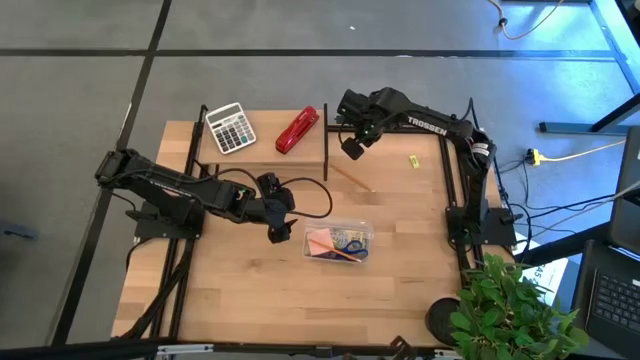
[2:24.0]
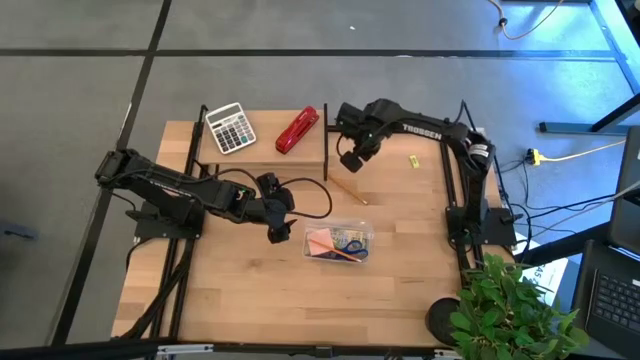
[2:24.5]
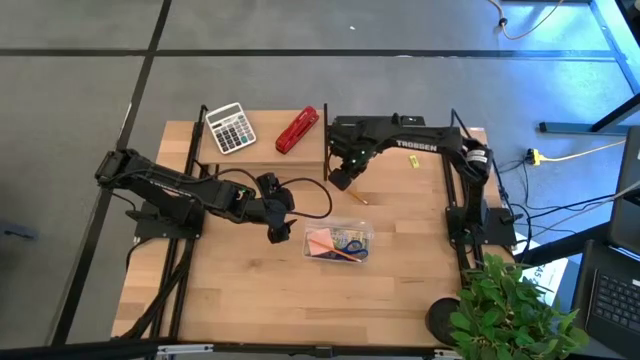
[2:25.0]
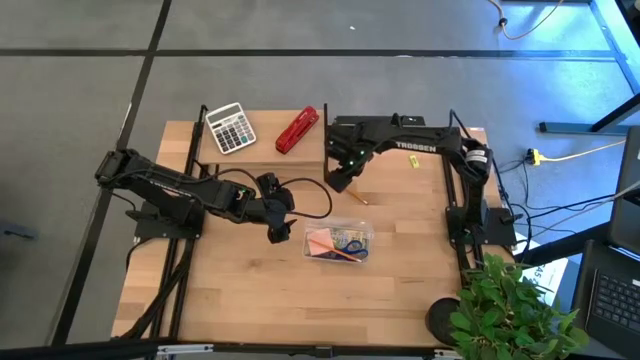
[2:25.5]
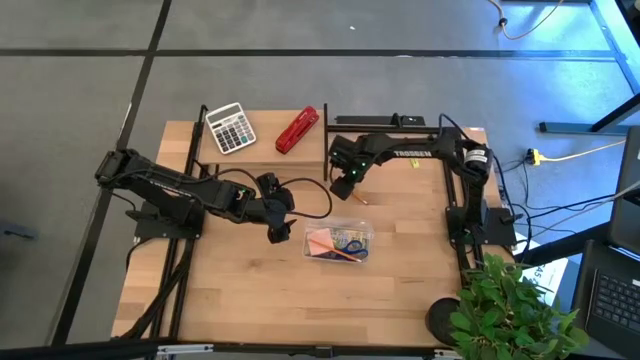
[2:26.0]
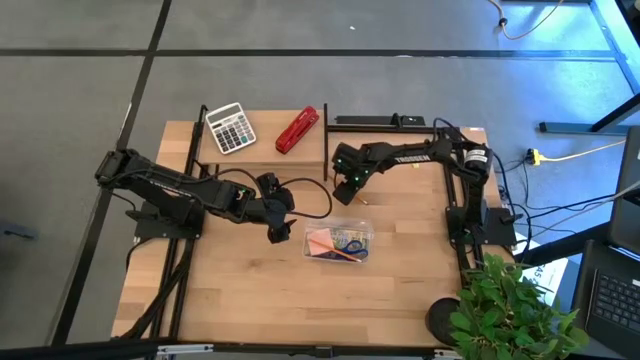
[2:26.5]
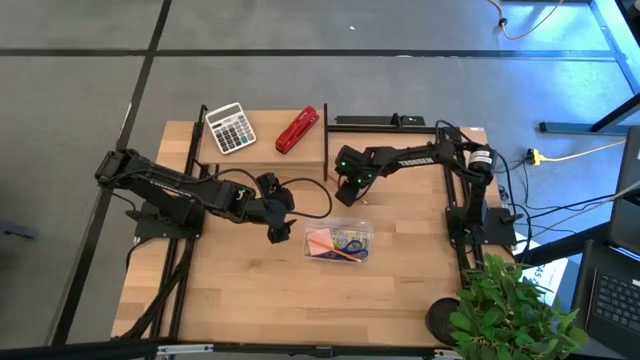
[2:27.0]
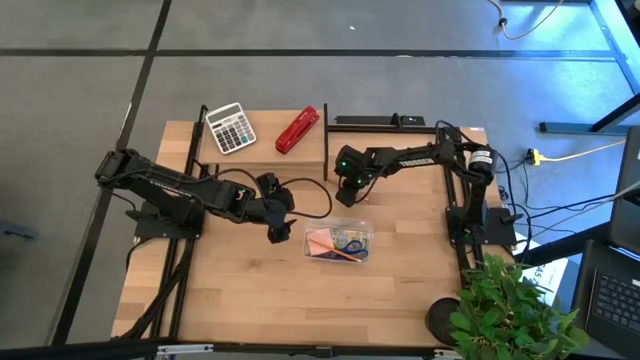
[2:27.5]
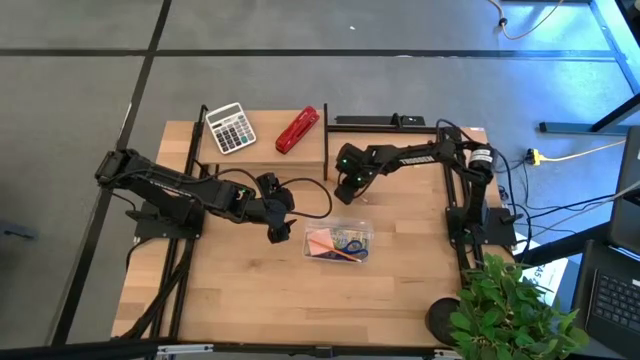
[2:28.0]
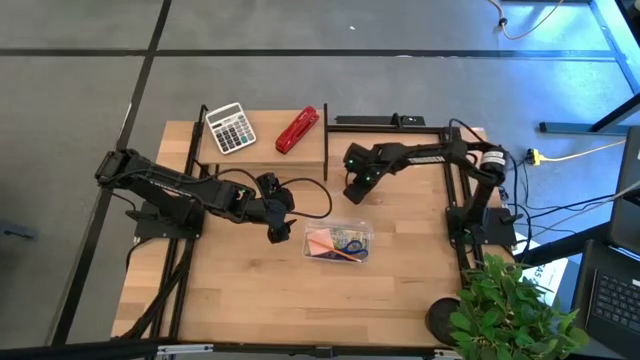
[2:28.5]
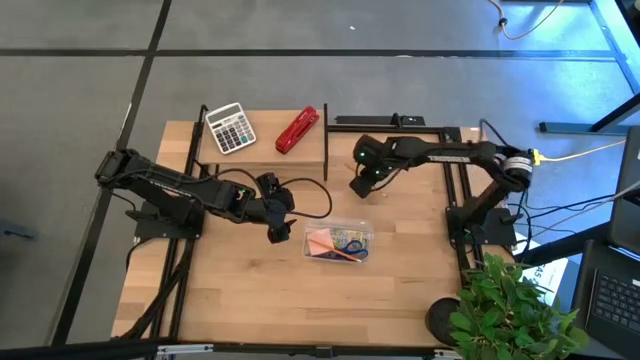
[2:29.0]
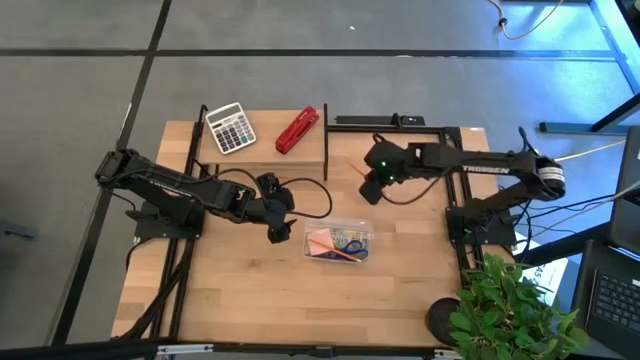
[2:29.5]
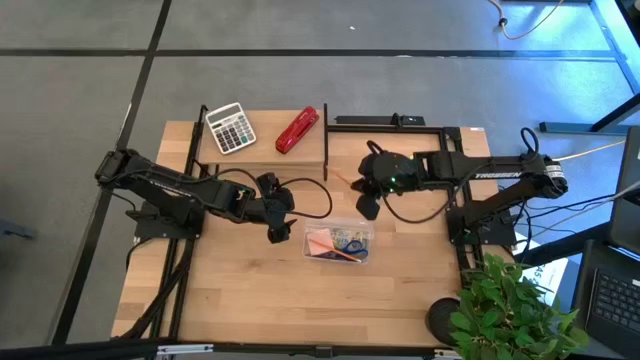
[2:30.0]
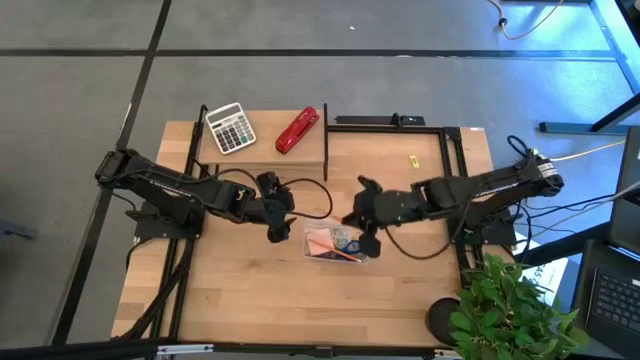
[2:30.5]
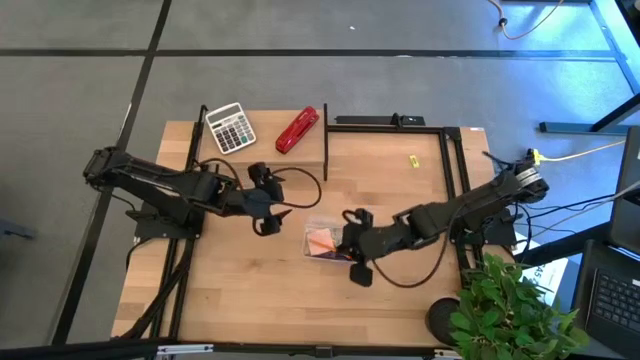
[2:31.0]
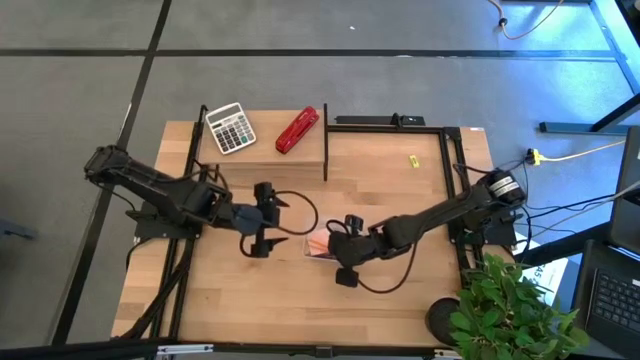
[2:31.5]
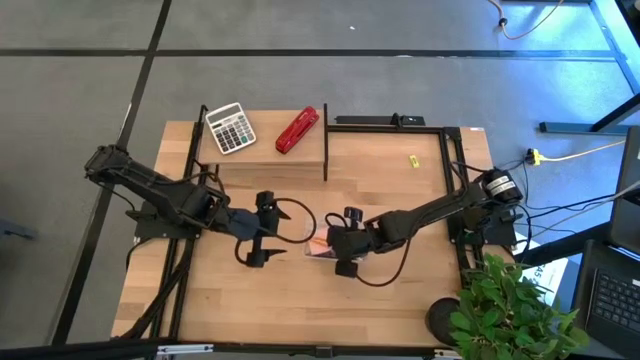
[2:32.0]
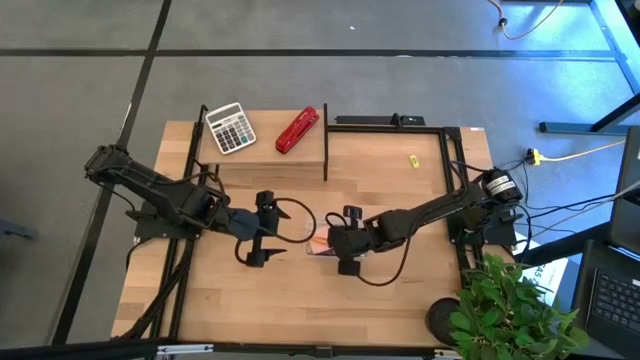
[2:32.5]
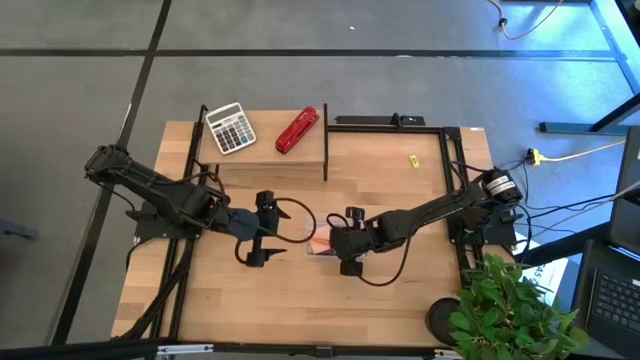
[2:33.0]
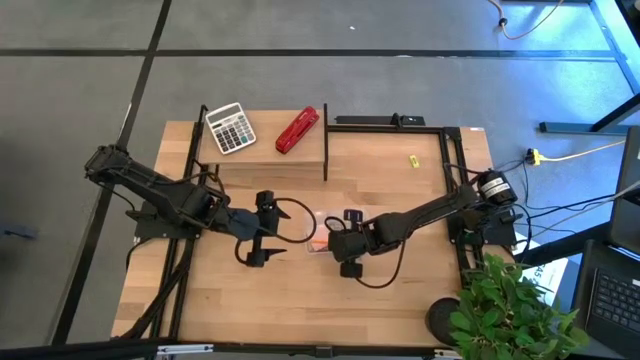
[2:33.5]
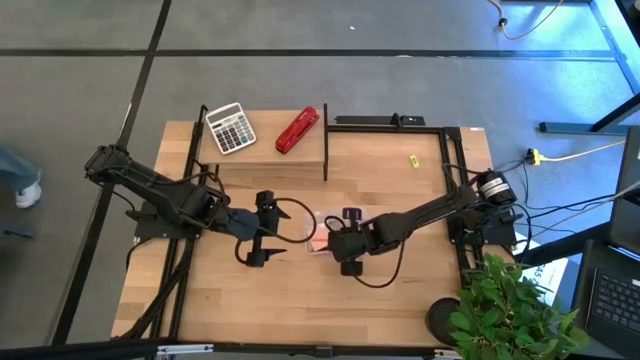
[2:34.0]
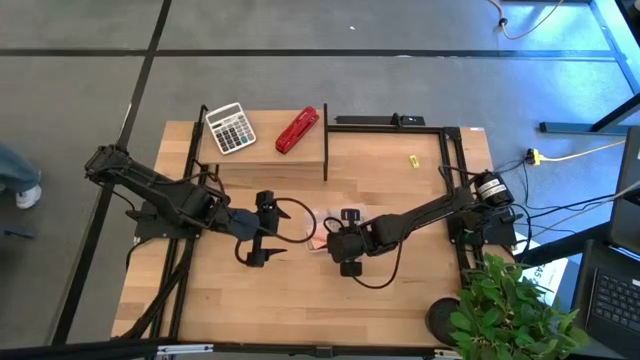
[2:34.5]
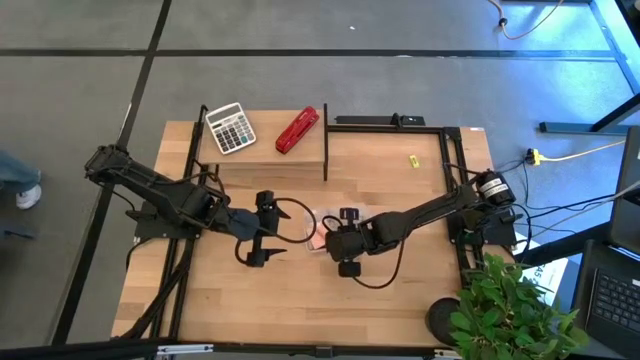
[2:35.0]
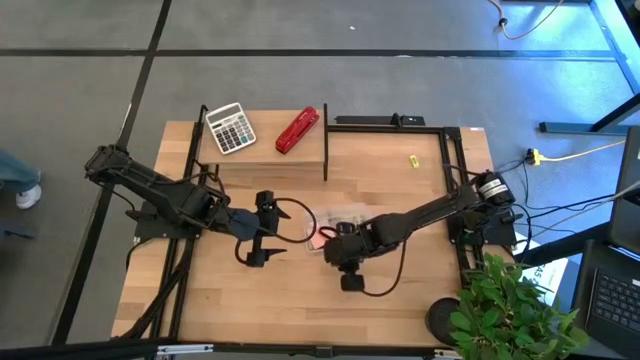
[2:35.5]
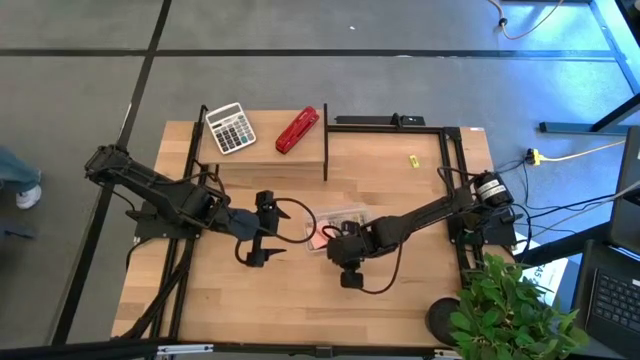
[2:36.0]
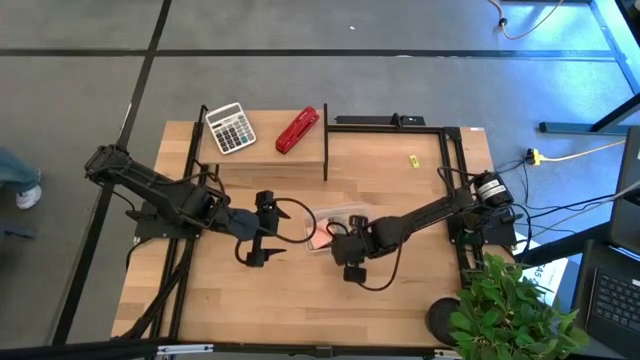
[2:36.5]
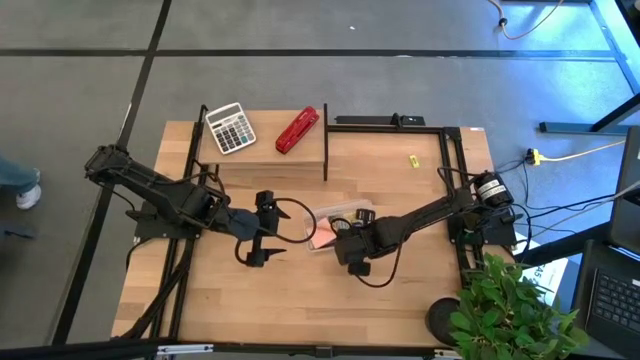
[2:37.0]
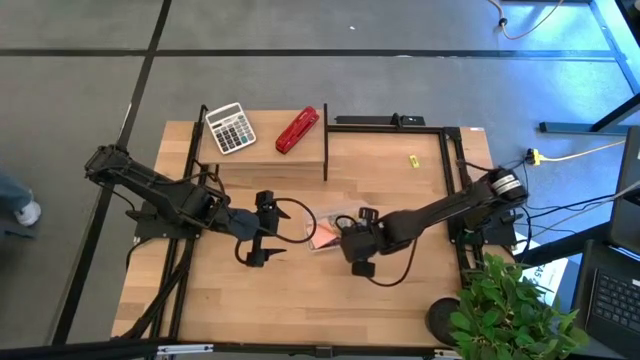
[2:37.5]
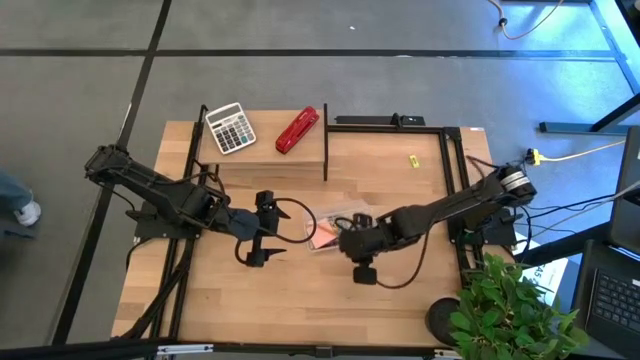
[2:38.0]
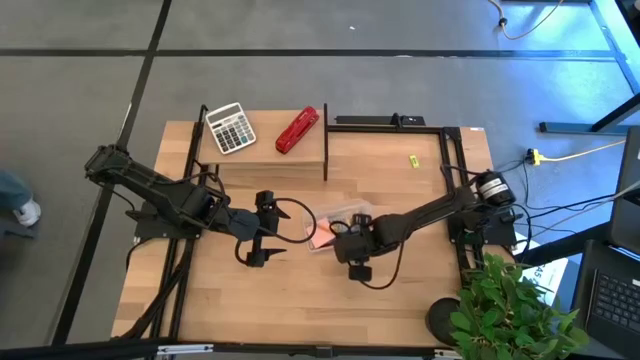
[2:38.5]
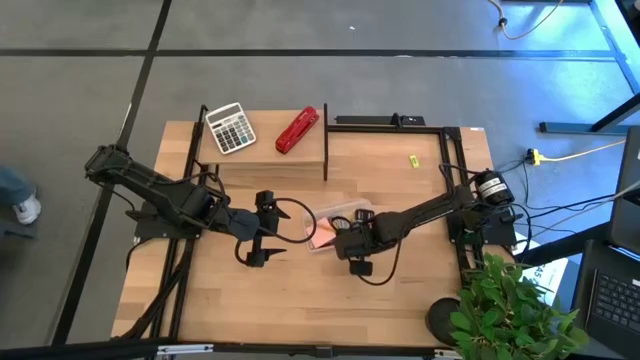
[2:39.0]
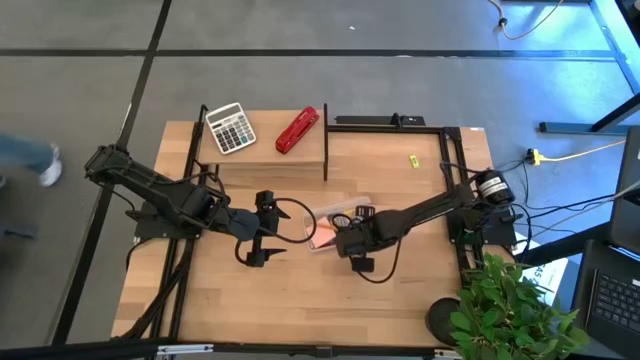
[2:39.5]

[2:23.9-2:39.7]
Task: Pack school essentials
Put the orange pencil into the transparent supply box
